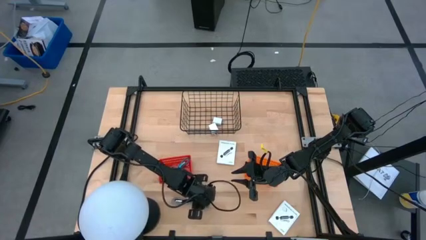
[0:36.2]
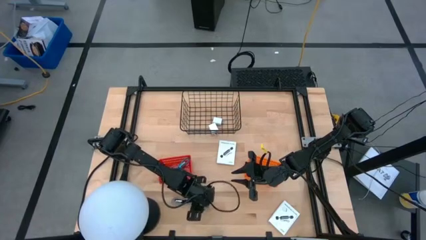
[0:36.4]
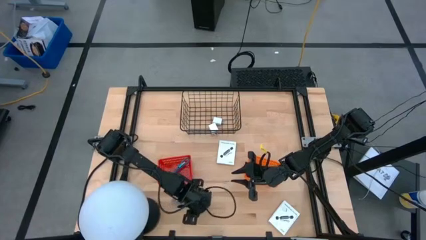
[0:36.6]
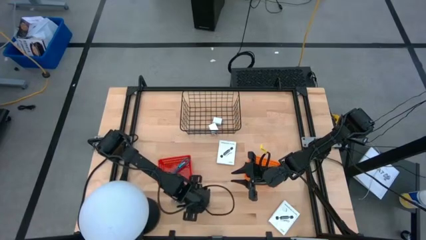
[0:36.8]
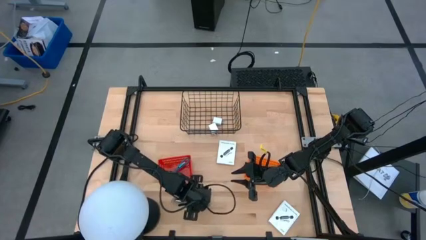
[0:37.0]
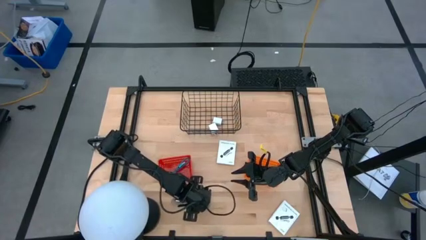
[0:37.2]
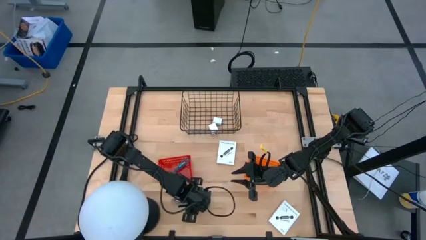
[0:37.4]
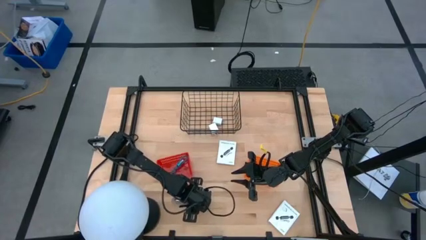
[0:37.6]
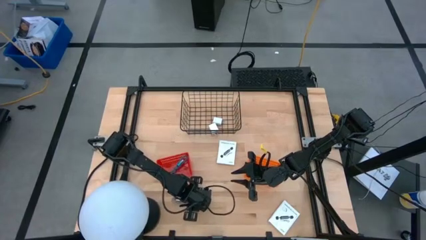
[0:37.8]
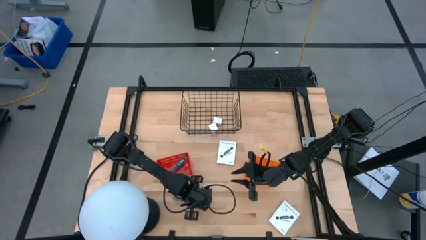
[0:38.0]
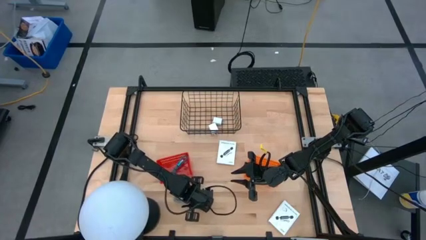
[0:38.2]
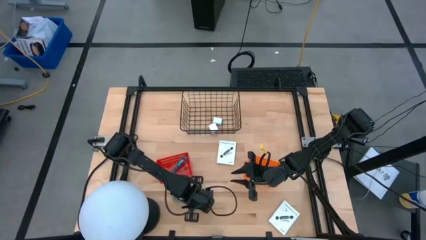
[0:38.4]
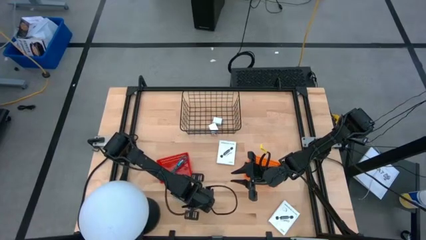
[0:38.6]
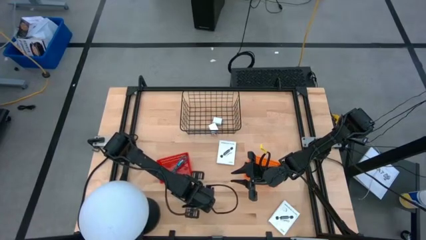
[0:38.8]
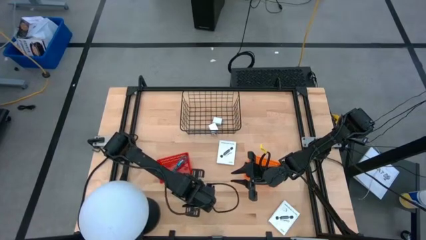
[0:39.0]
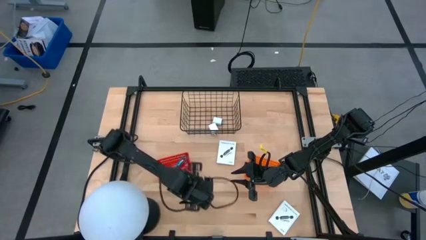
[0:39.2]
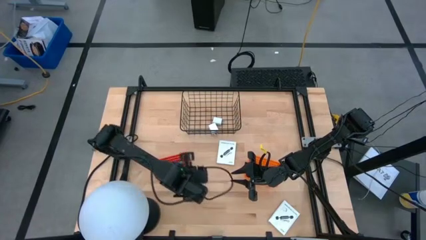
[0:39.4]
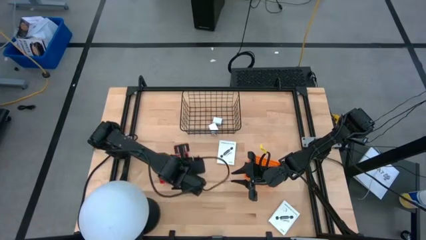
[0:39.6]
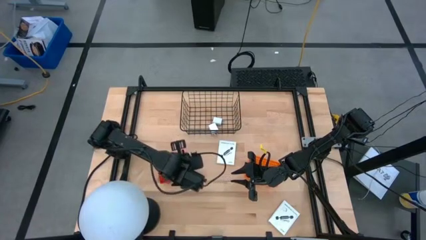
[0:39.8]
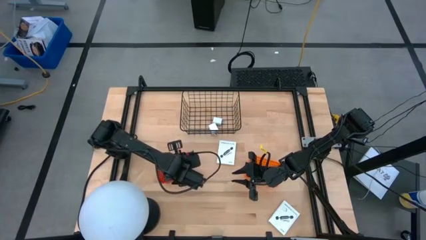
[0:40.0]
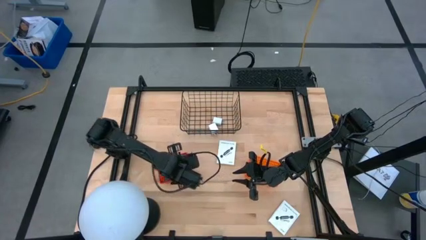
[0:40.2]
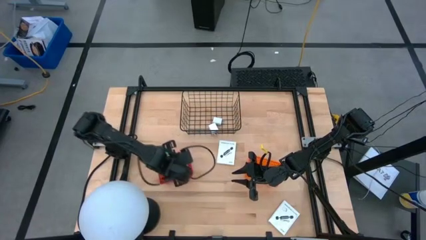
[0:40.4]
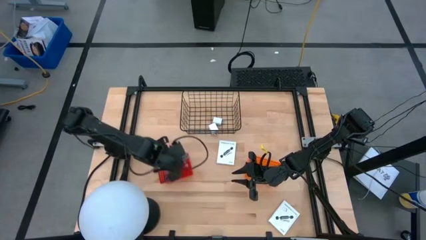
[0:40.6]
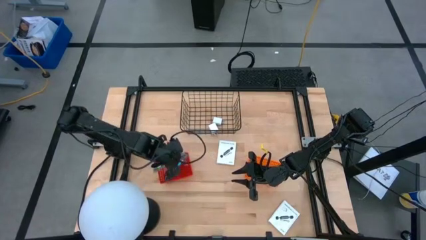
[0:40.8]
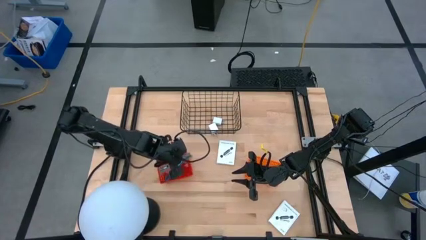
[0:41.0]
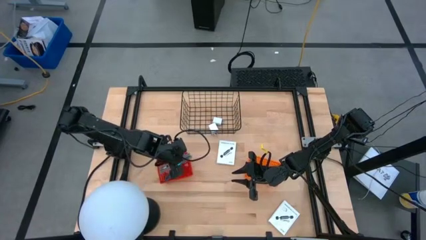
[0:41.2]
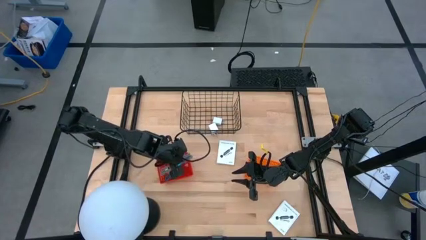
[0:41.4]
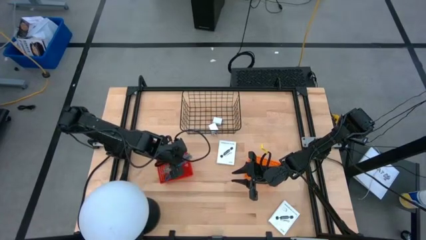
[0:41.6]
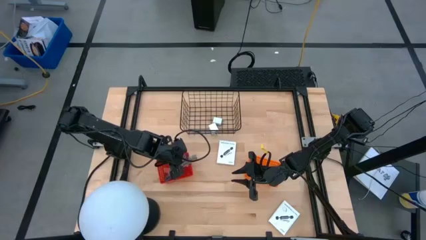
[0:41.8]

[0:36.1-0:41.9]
Task: Pick and place items into bin
Put the gray charger cable into the red basket

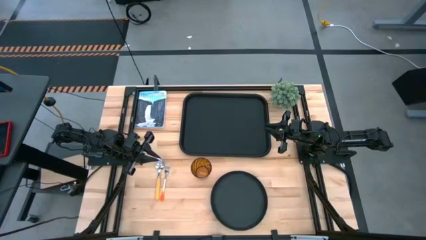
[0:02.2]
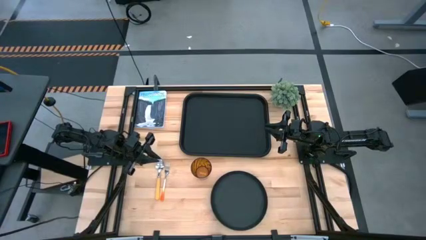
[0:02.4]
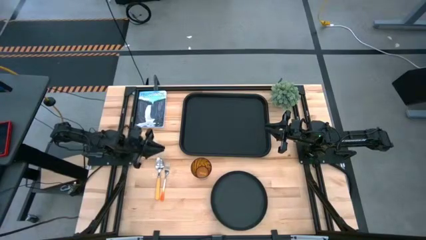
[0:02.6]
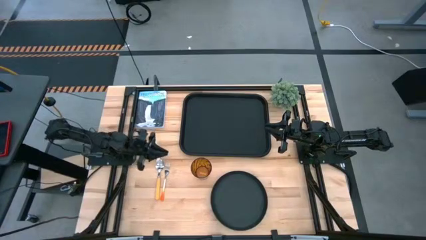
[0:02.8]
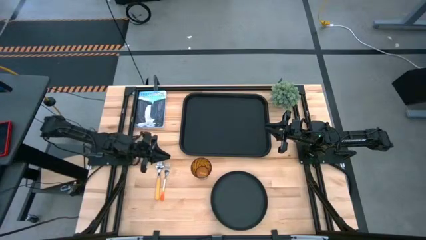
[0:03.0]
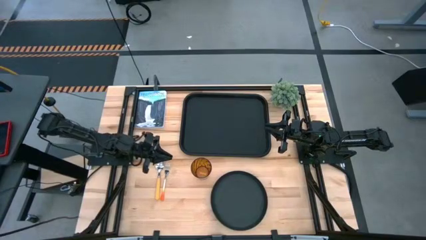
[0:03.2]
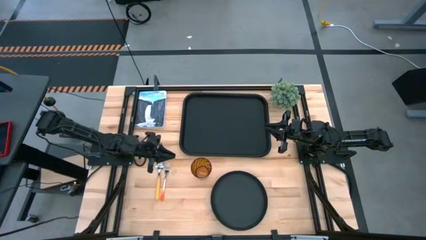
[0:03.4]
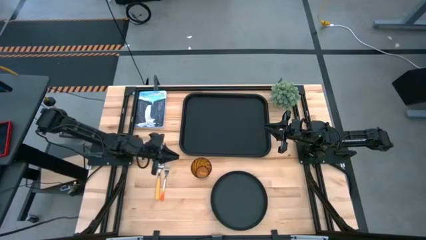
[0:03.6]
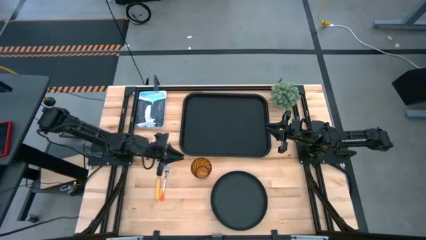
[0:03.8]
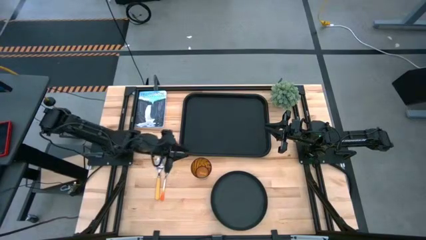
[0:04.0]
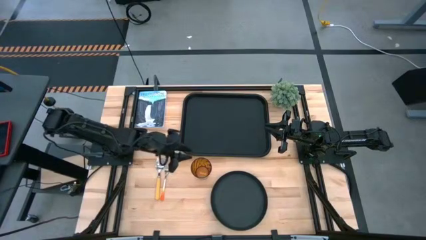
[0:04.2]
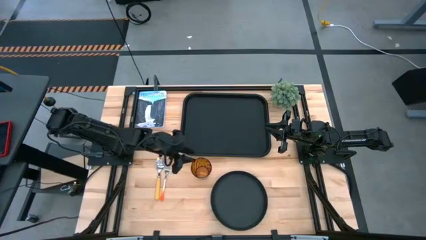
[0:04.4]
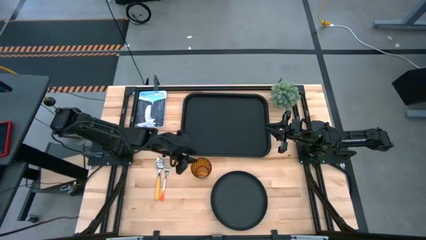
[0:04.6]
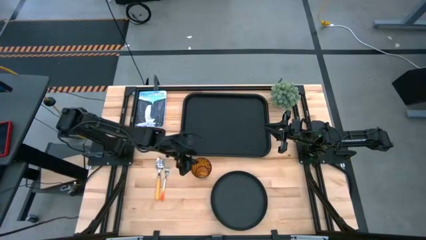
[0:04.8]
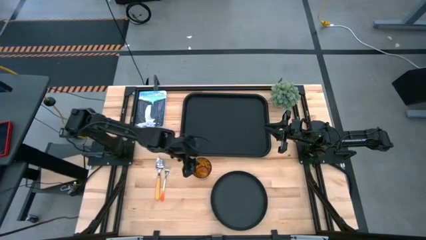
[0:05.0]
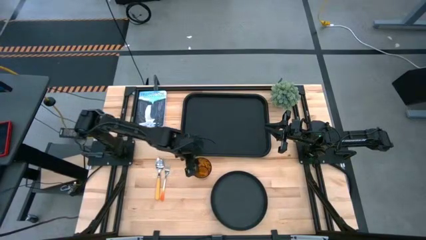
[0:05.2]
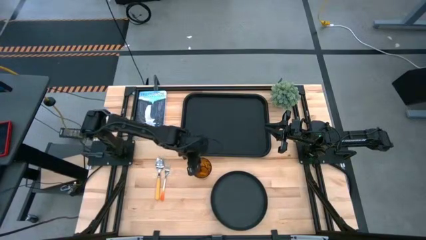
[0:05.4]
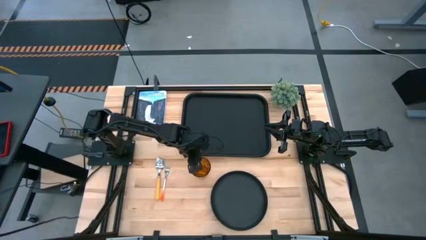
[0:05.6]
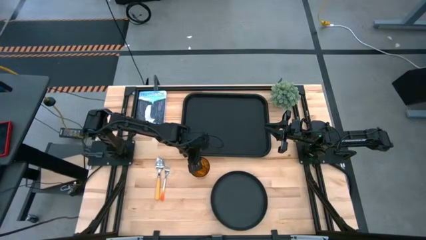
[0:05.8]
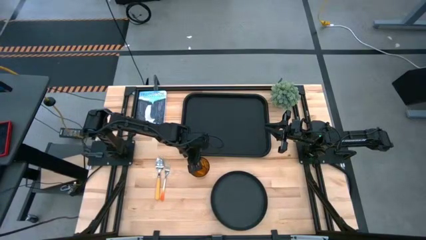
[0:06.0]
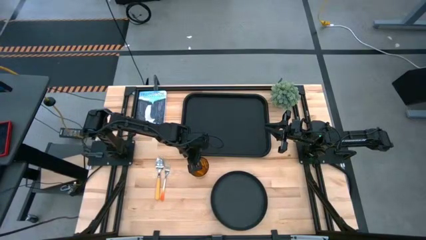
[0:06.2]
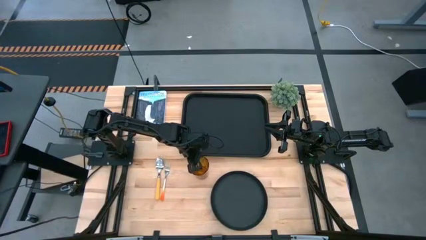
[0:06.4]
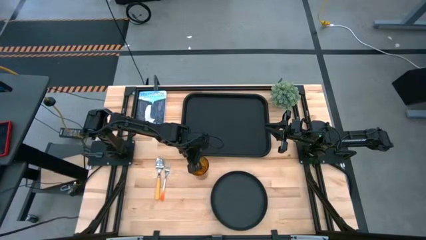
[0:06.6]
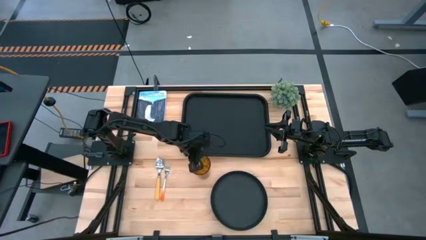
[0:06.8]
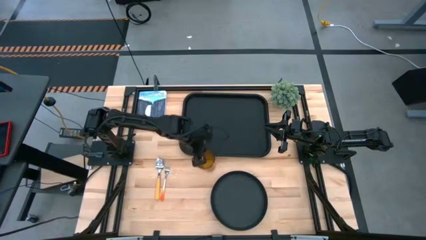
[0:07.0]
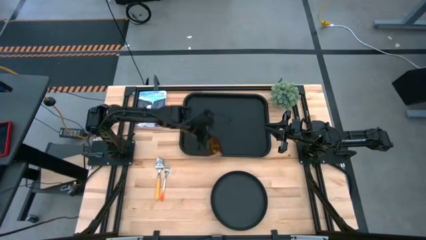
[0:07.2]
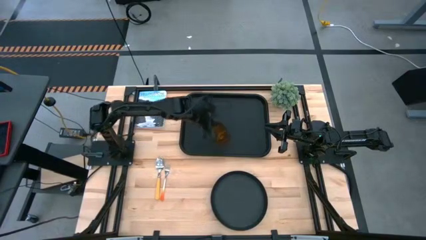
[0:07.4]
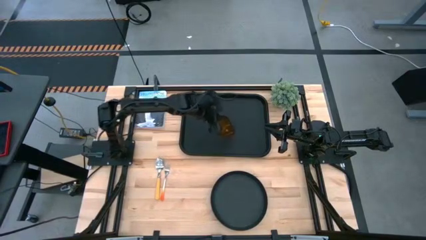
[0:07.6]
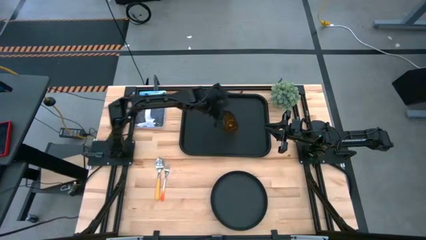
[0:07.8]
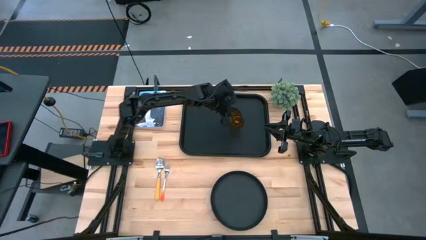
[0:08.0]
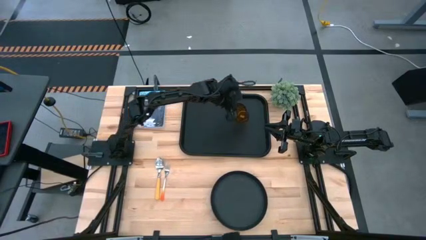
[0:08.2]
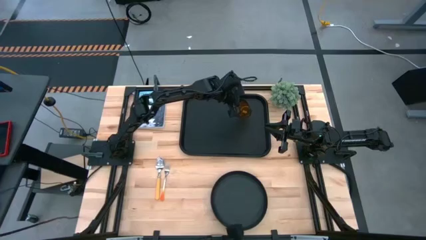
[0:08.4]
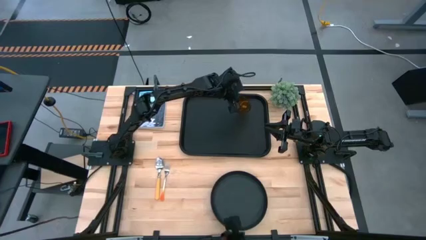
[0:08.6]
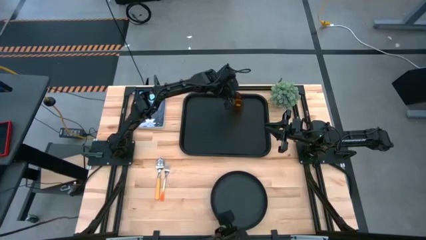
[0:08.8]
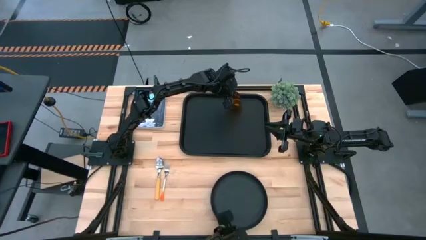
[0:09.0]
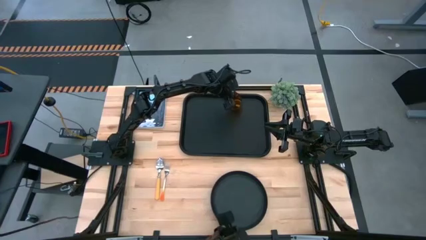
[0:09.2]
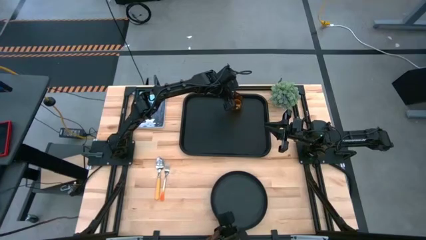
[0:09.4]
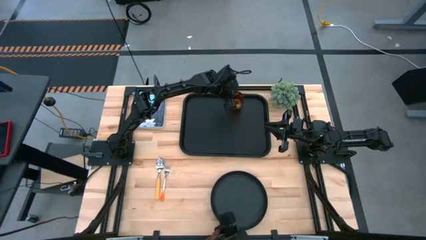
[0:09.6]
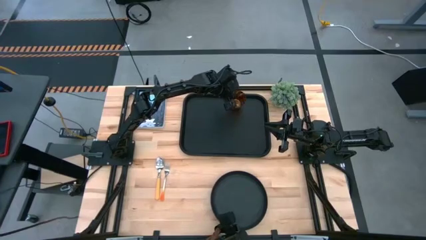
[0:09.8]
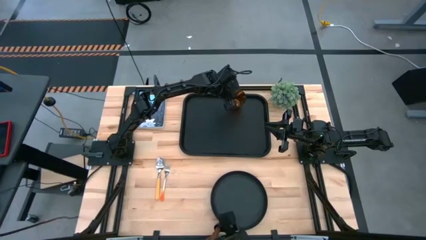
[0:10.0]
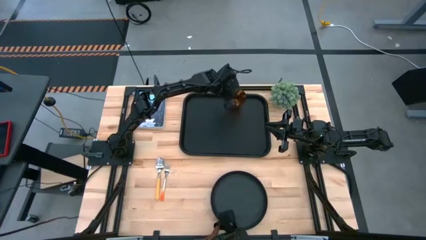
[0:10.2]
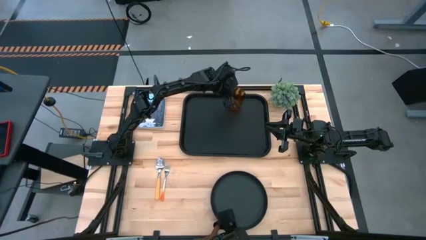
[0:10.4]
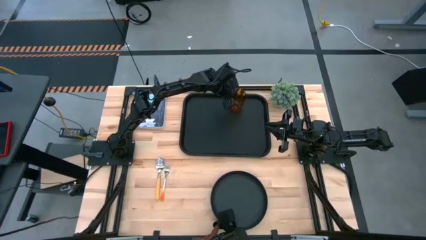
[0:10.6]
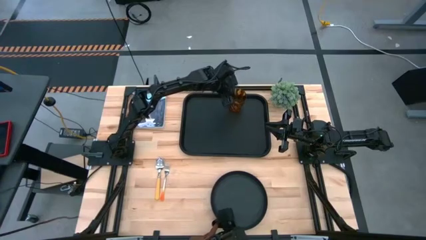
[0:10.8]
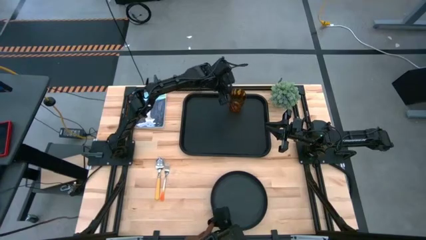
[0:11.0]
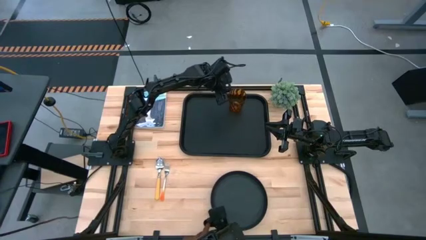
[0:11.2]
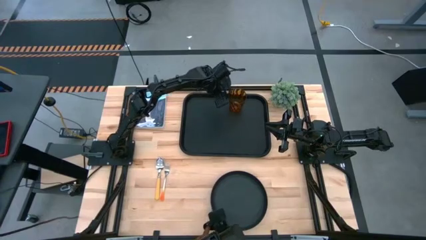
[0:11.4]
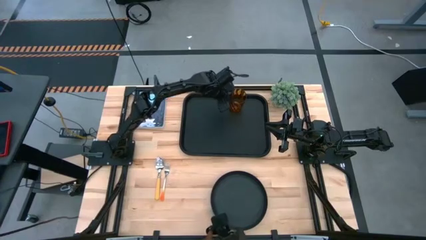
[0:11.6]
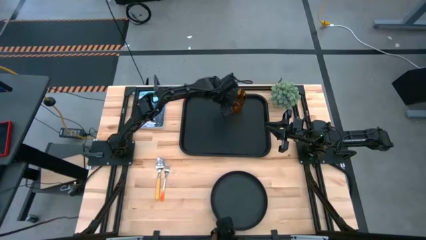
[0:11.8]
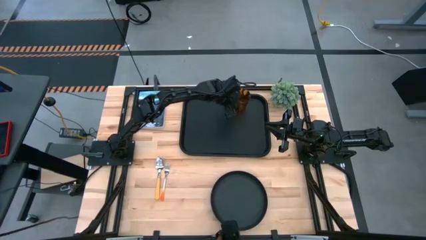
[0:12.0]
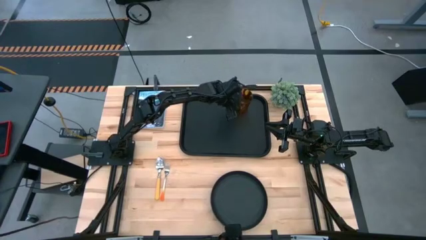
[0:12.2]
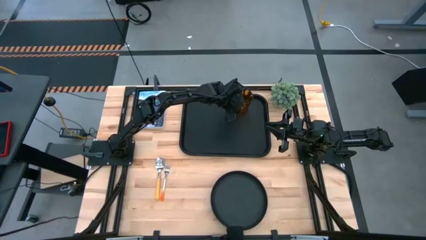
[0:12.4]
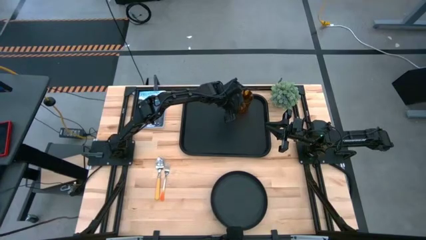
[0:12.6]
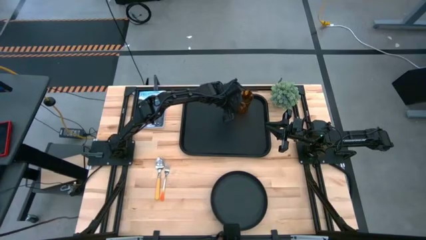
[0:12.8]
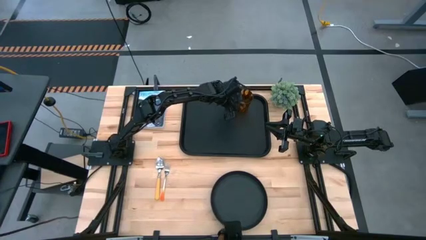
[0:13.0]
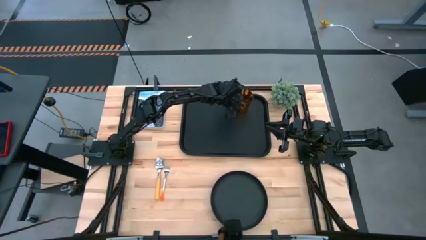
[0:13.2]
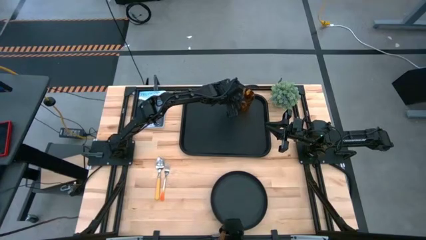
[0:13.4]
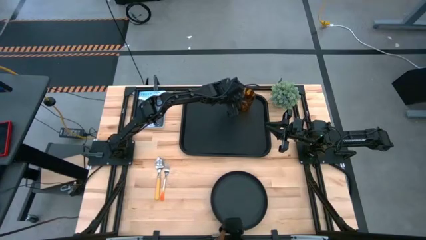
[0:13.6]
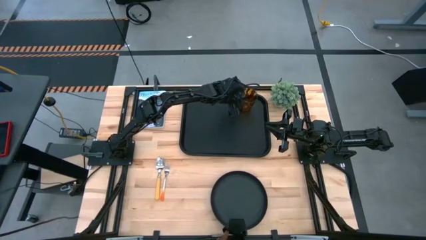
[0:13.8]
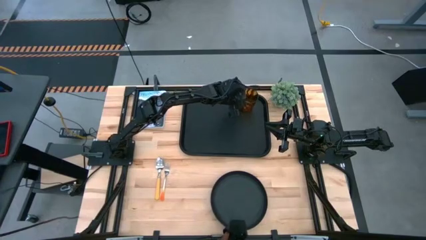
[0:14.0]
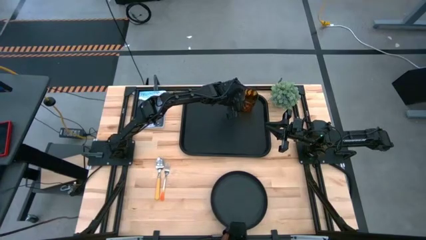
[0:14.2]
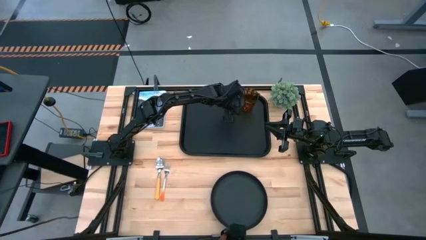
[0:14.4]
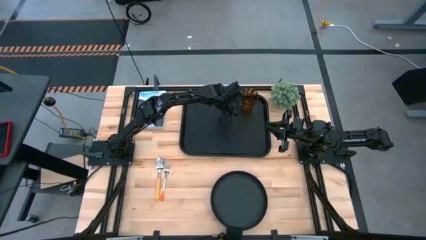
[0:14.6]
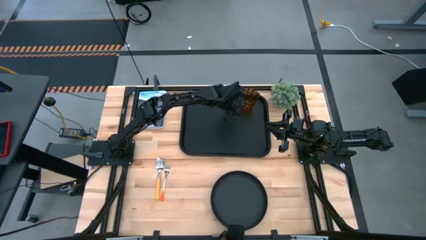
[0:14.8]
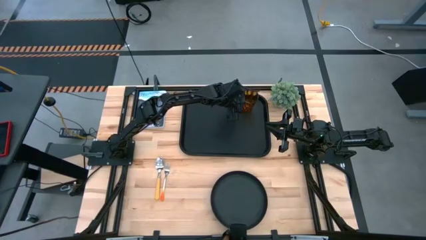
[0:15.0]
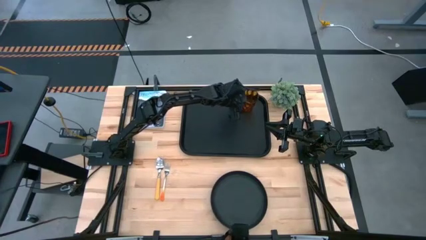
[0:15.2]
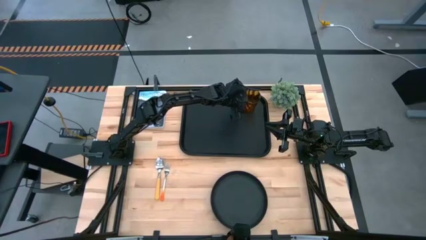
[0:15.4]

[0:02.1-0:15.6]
Task: Pick and place plate/cup/fork/spoon on tray
Put the brown cup on the black tray
